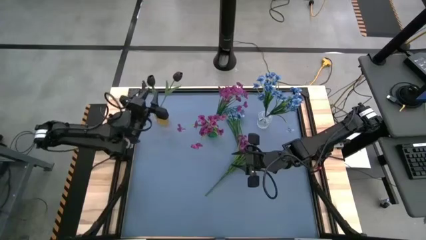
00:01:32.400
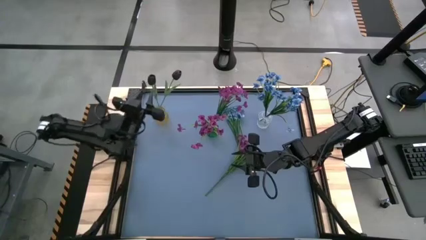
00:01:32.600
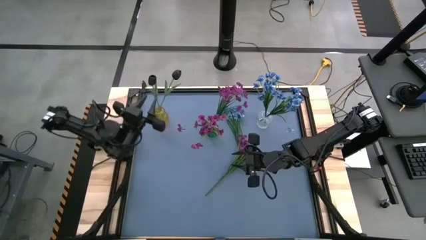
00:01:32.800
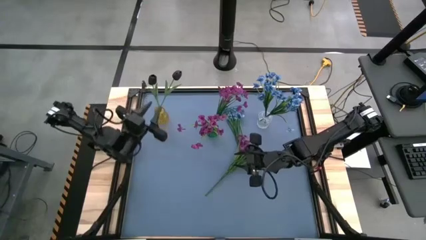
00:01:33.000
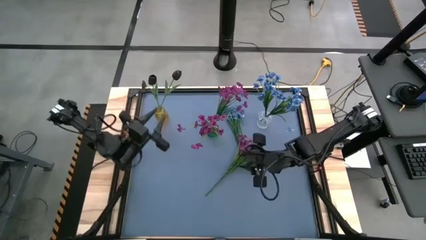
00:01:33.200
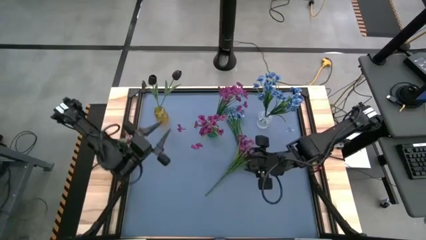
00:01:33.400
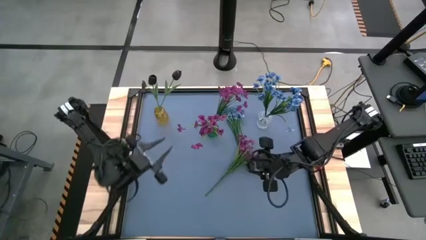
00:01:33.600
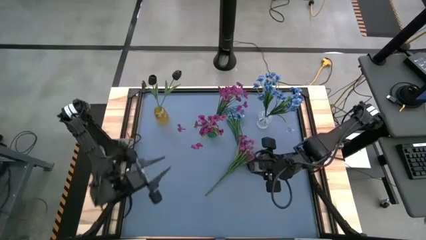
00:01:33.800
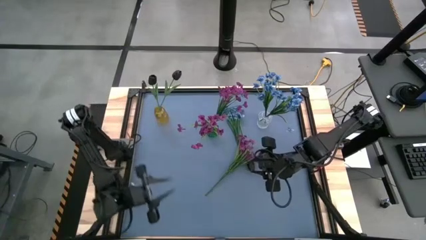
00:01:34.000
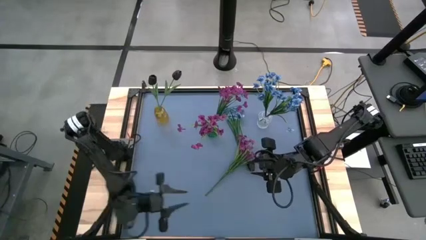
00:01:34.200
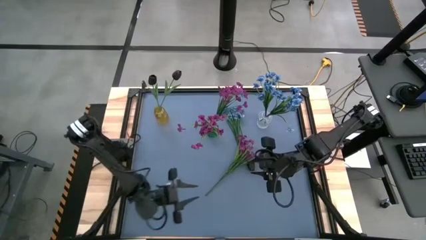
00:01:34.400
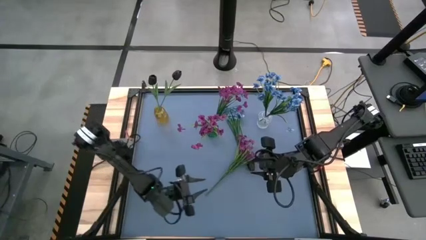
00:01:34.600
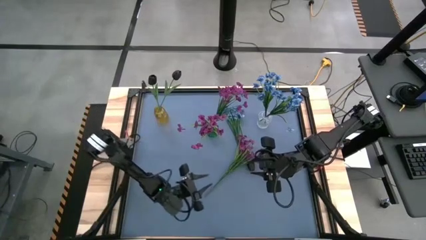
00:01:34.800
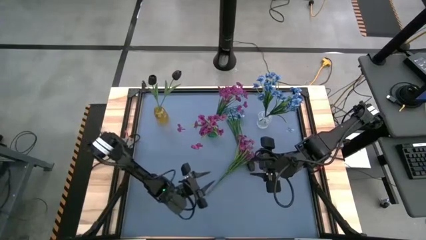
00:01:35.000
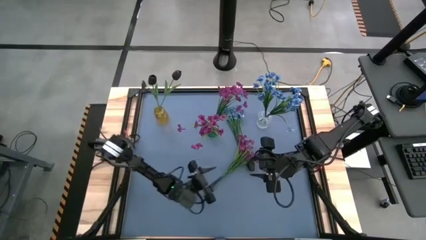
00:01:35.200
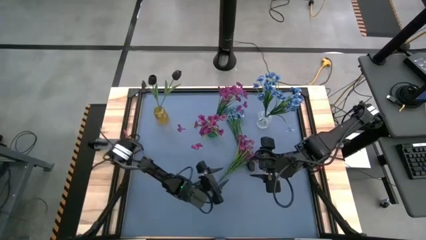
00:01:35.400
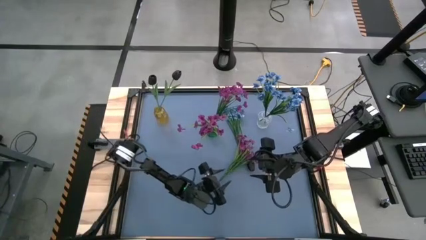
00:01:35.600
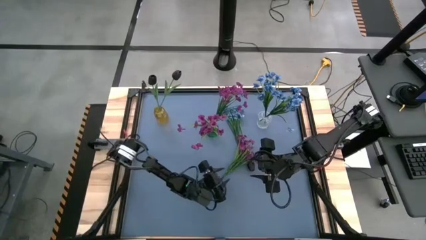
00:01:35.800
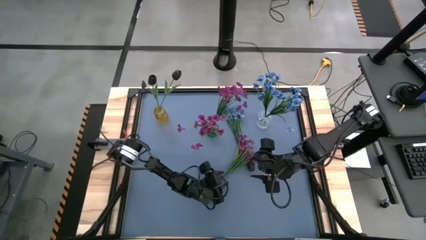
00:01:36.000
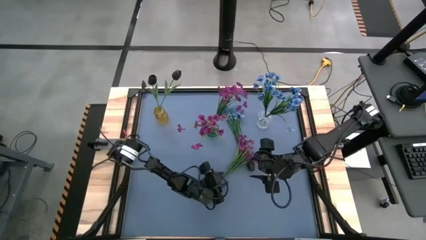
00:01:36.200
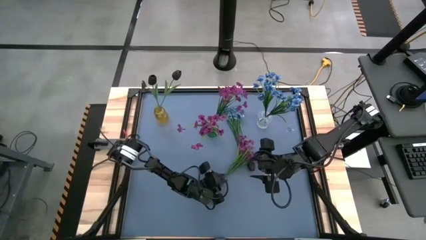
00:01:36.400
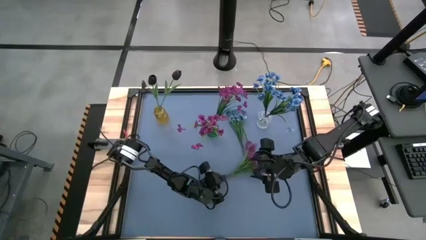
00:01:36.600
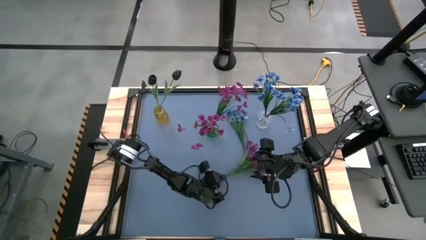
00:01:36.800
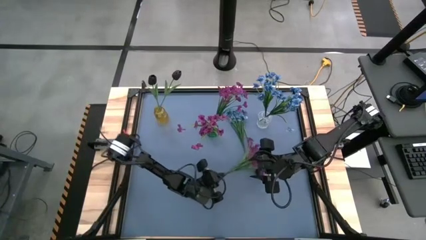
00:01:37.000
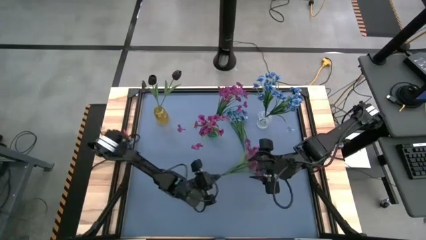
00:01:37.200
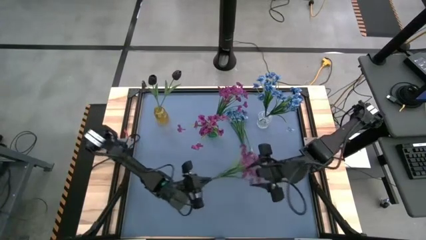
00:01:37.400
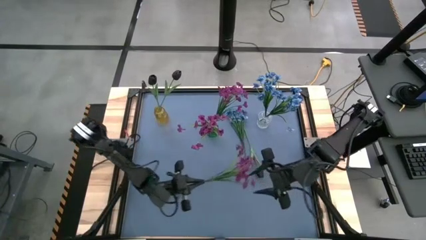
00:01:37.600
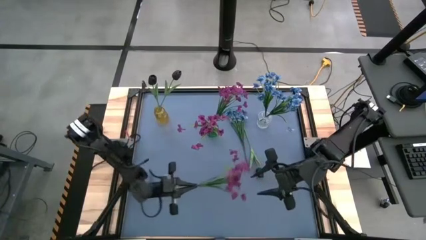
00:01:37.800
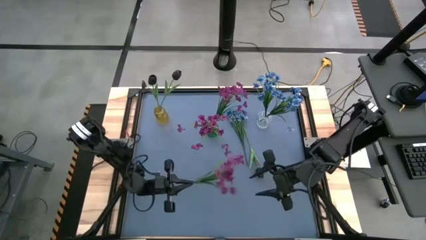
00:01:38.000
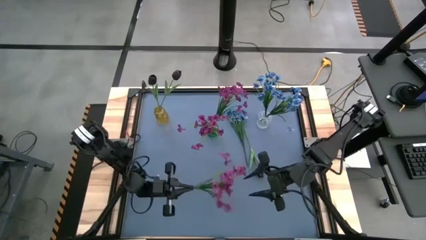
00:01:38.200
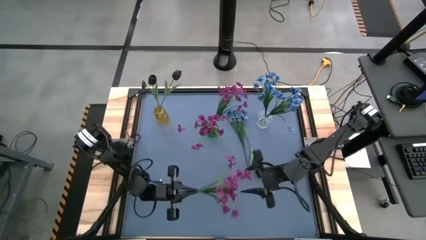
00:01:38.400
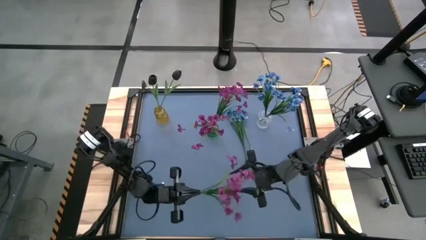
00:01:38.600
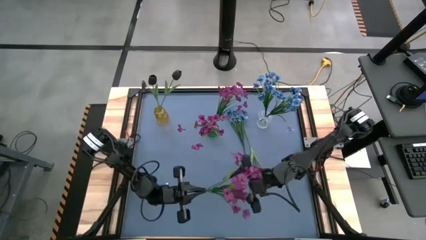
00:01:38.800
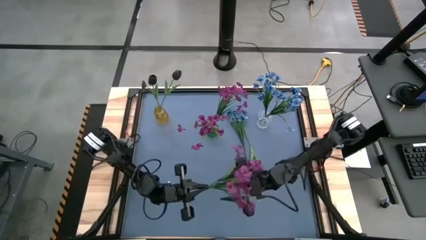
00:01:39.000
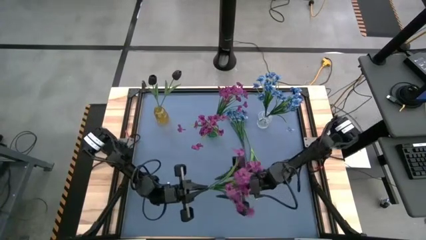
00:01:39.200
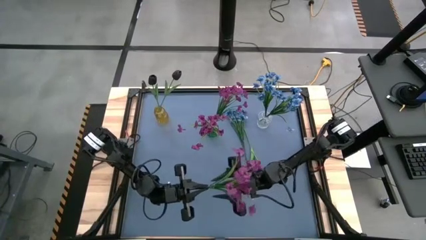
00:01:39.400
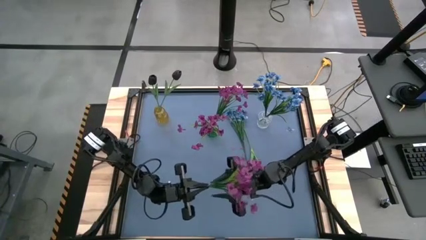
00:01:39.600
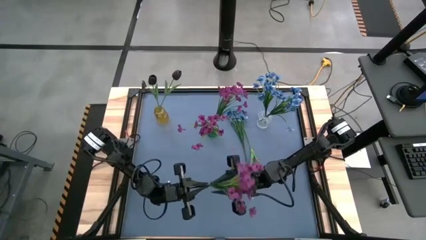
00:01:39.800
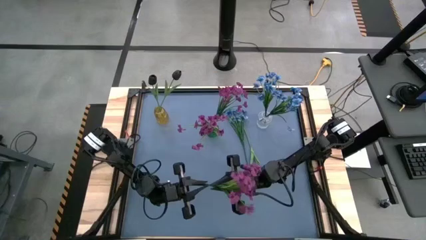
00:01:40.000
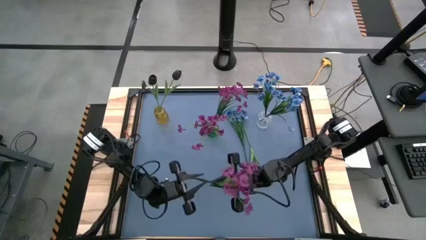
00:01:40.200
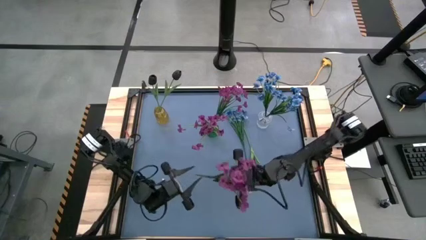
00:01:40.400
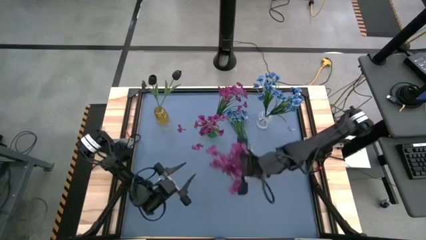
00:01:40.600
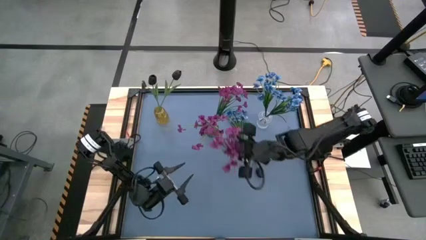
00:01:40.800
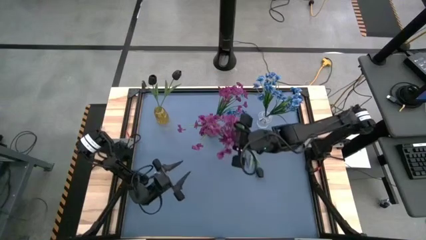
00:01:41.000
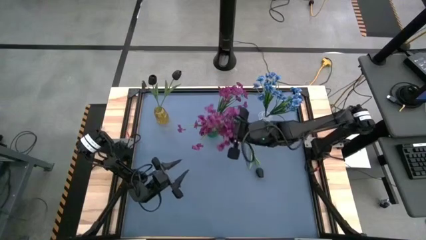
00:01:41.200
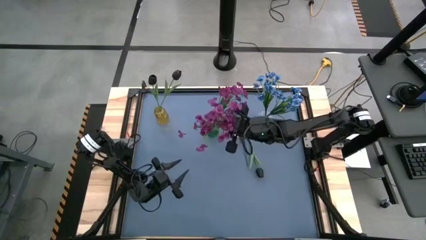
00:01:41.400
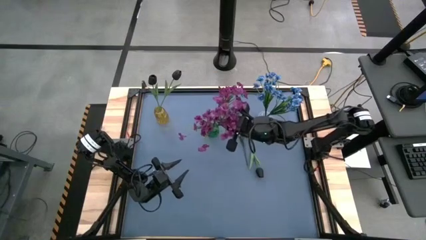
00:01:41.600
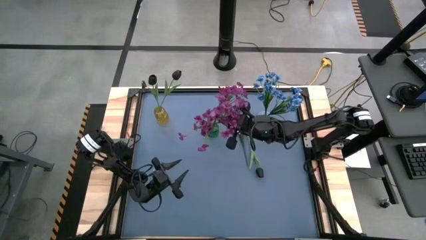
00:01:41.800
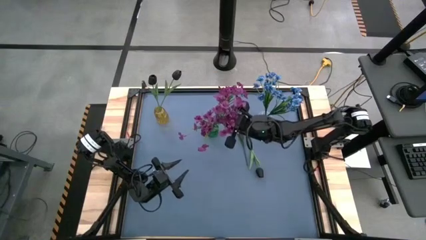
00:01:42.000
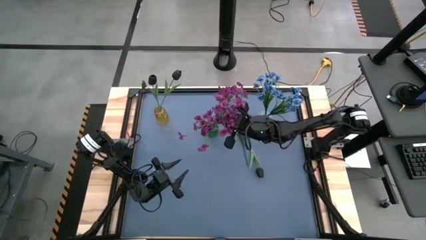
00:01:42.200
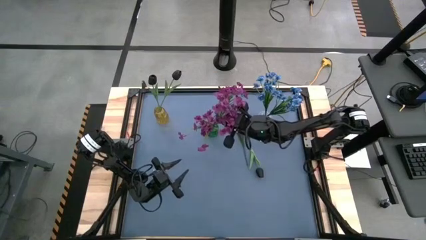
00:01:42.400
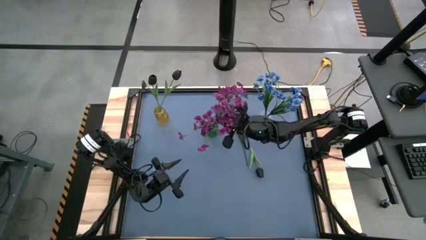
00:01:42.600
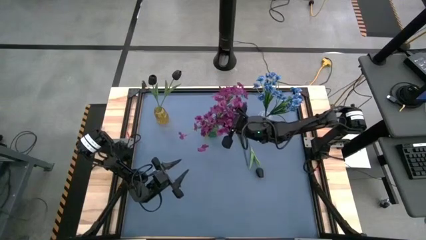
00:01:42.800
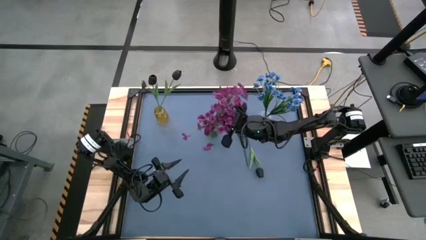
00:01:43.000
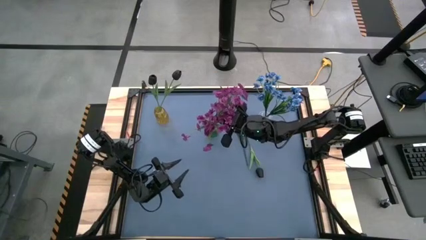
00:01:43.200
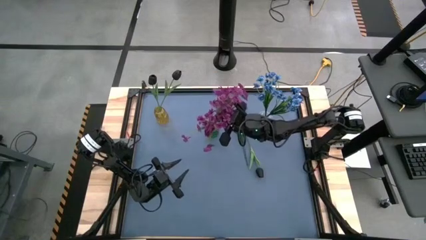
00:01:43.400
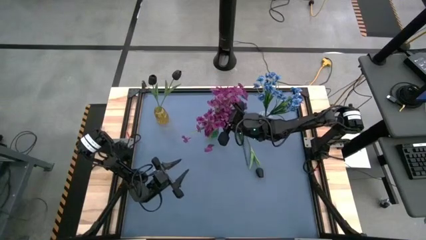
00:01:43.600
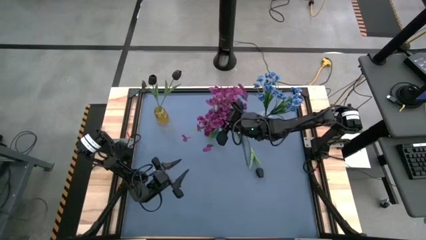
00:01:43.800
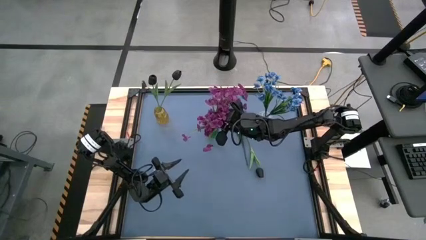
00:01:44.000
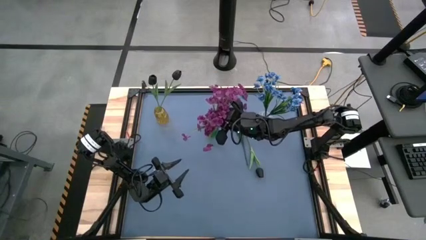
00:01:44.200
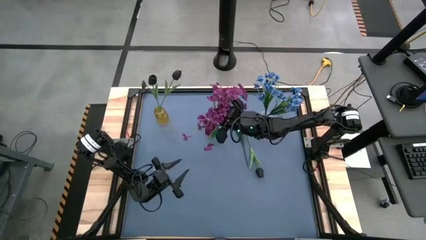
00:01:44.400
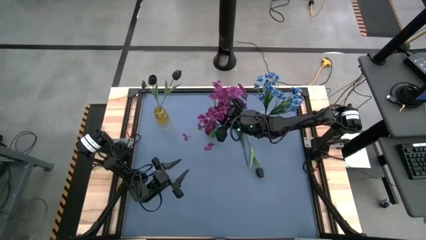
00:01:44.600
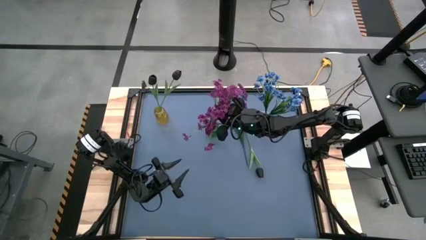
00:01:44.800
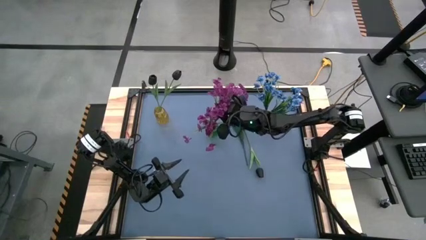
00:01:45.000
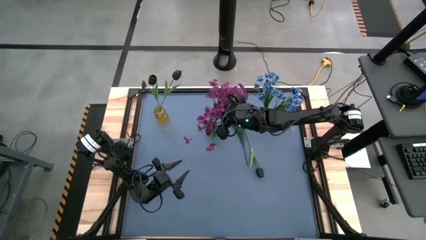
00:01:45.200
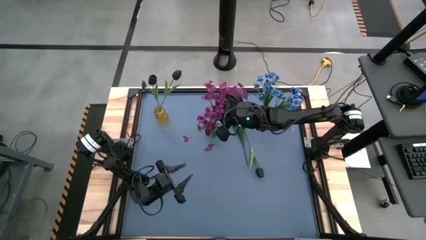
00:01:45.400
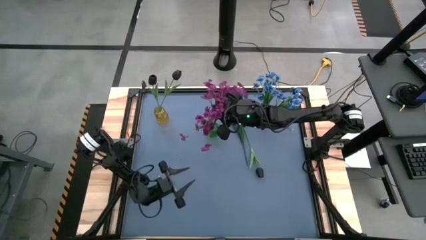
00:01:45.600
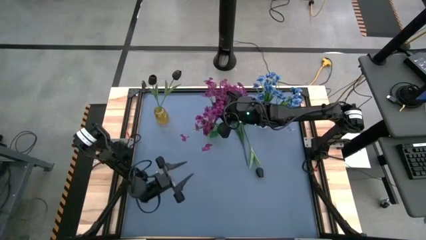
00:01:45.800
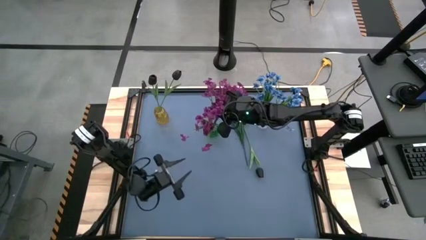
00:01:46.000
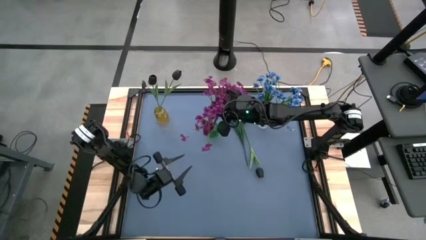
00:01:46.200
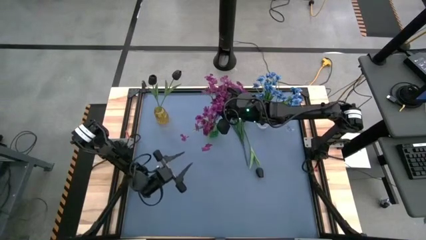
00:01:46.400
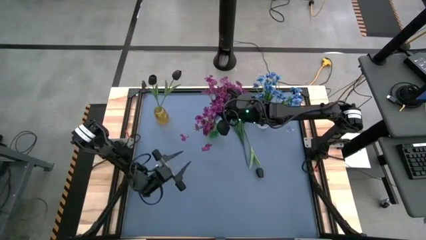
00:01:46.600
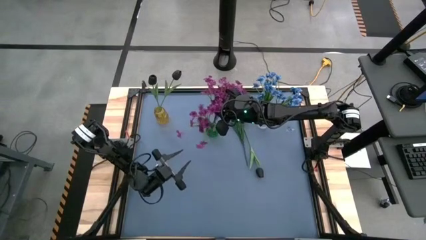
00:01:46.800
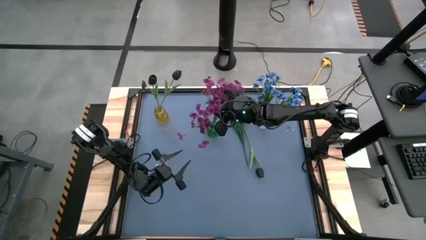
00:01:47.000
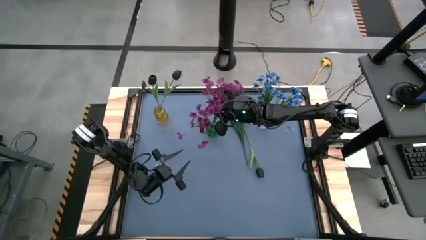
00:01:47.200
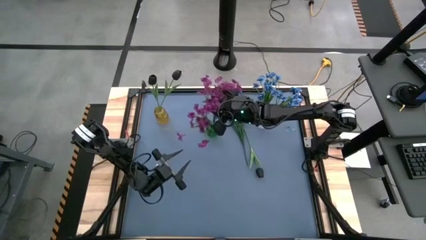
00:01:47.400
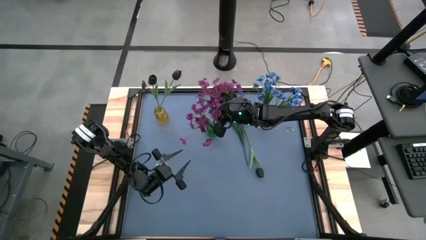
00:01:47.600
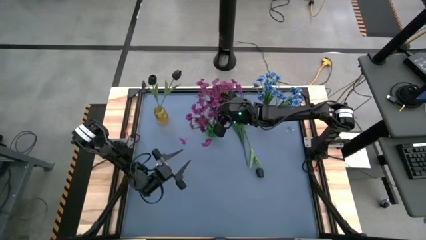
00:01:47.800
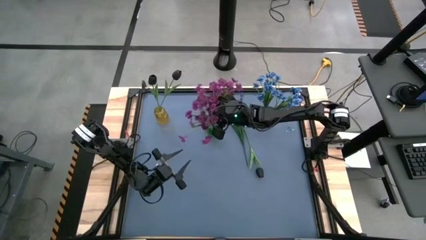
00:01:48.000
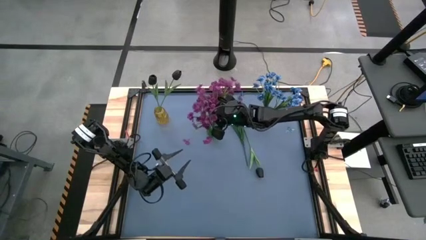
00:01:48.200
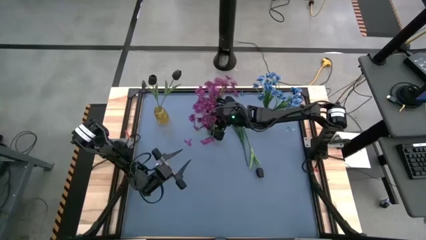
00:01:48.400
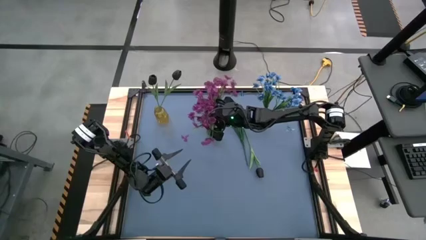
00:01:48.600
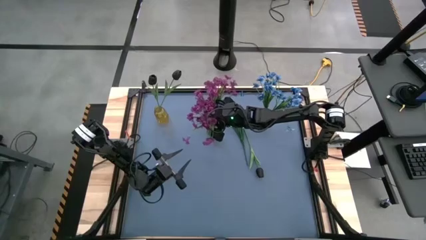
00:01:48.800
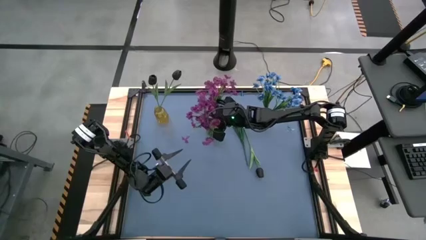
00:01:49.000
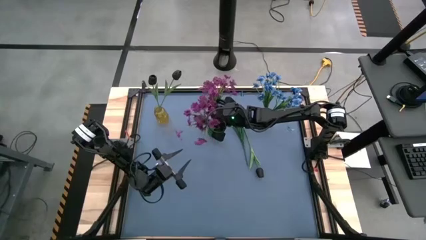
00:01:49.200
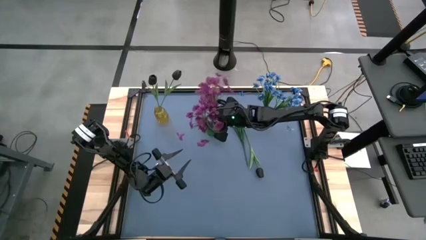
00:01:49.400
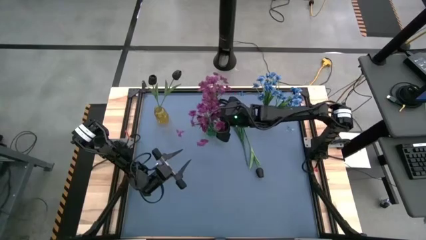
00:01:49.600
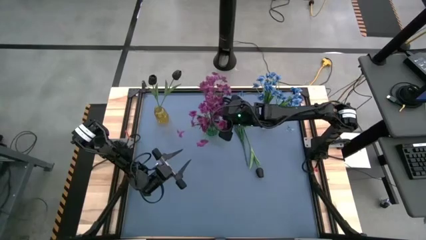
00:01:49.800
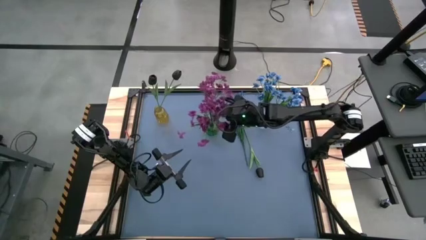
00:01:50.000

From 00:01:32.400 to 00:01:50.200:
Task: Sort flowers into vase by color
Put the purple flowers into the green vase
